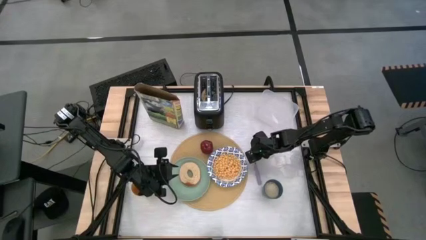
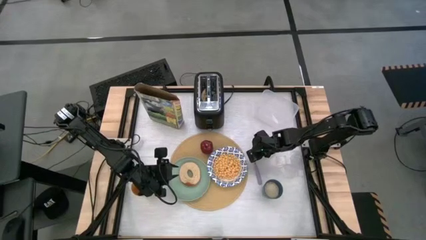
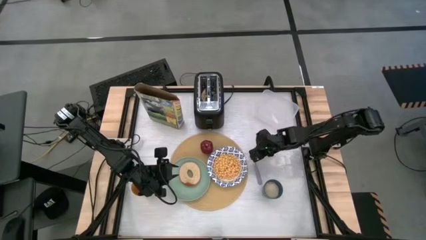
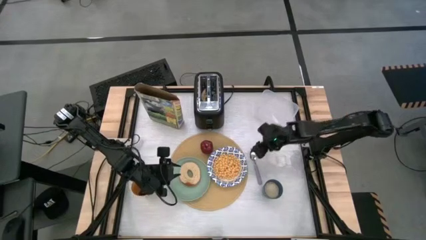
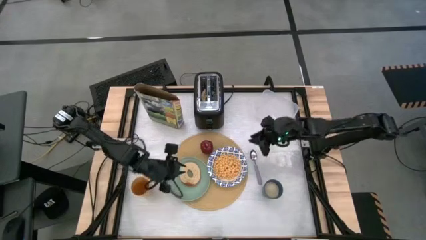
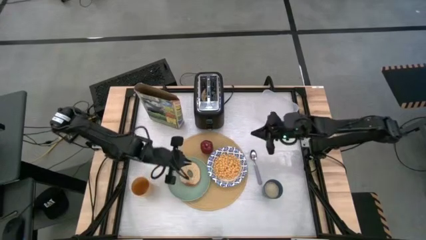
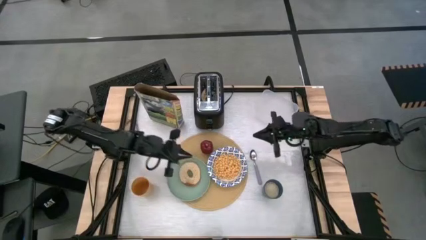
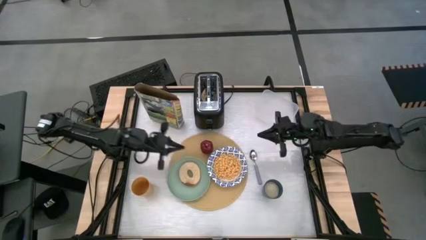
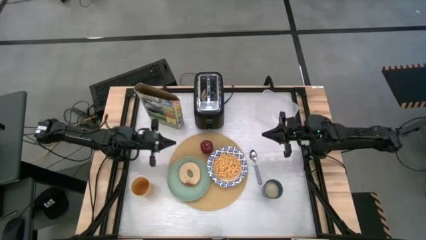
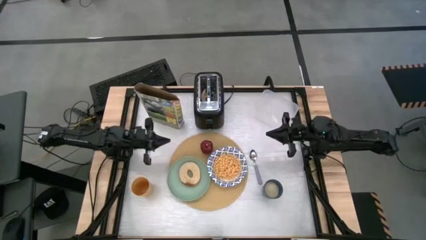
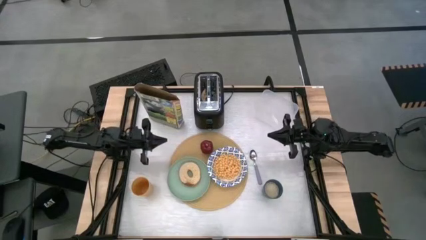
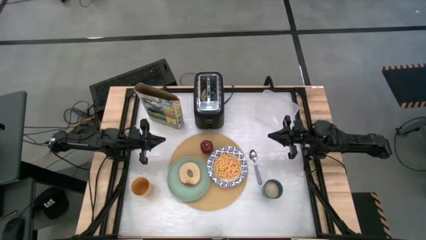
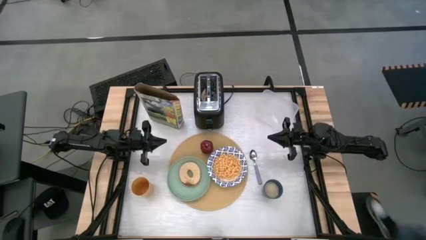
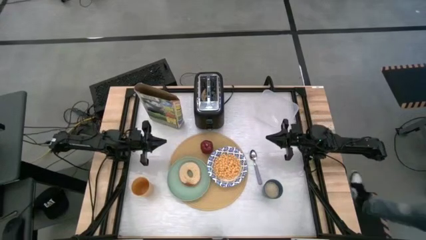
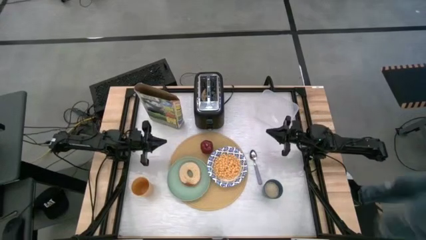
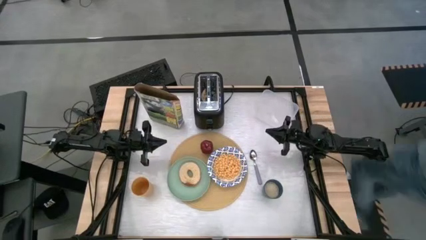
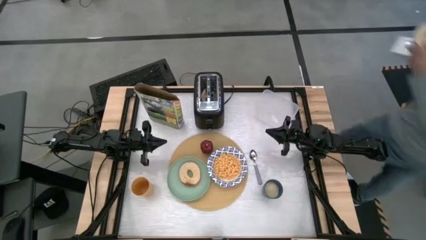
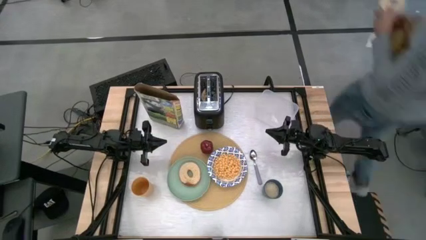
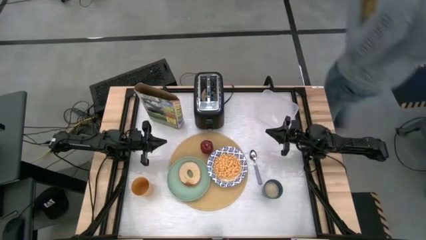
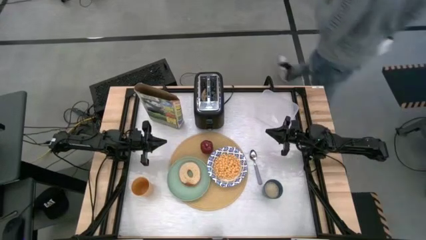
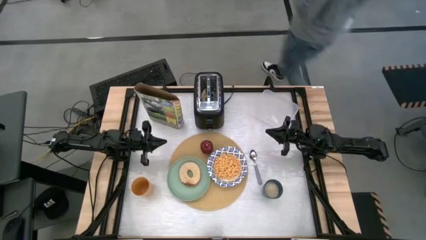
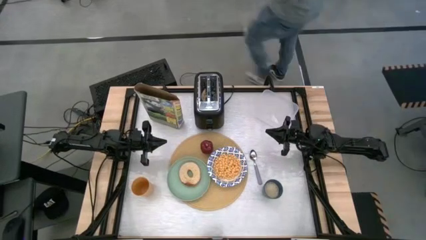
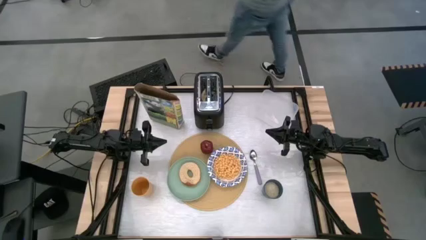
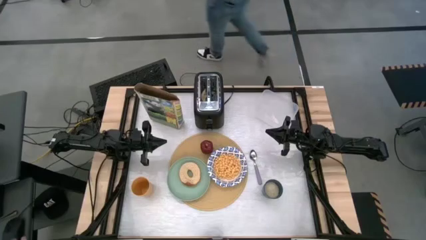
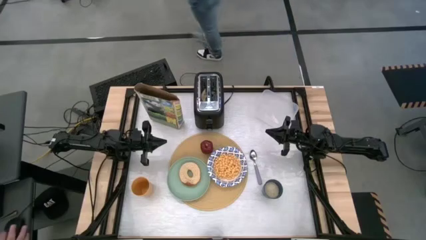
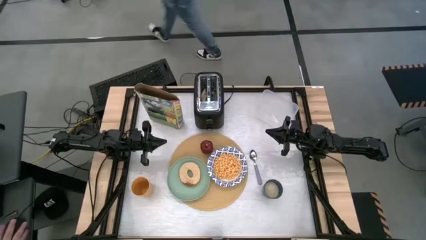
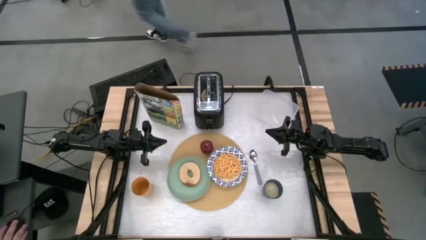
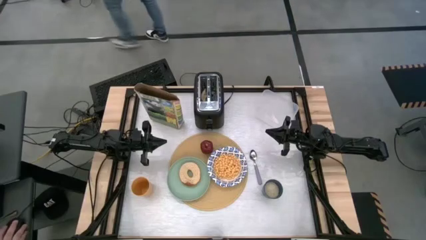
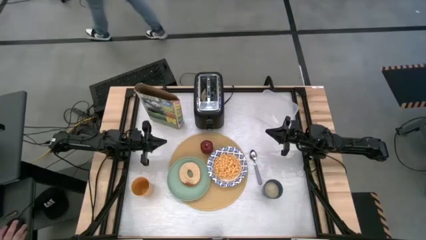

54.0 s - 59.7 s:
Task: Arrange a breakfast setting
Return to Home Position

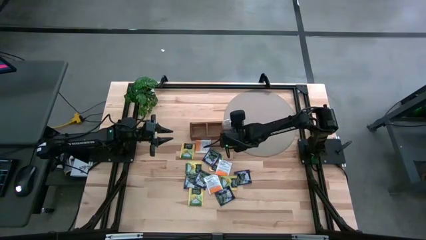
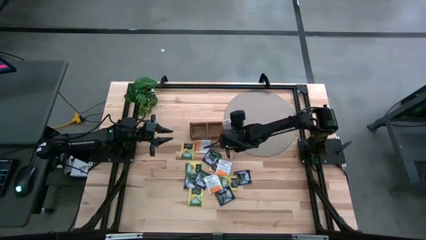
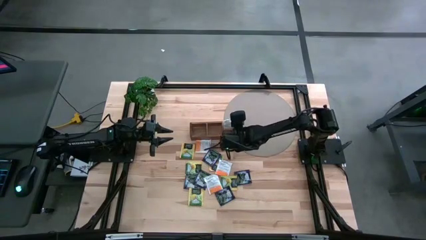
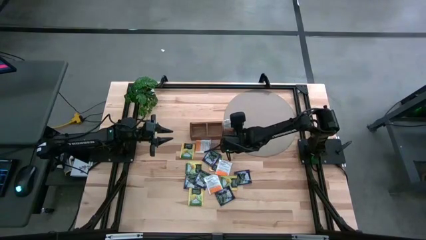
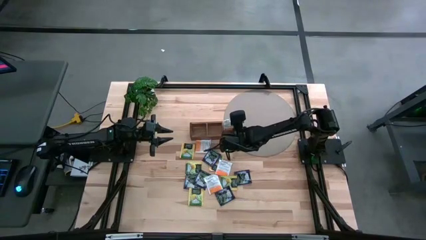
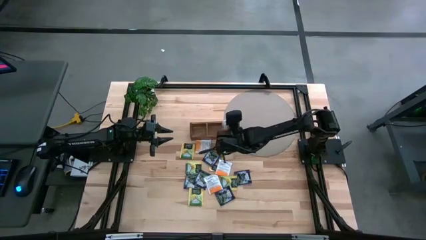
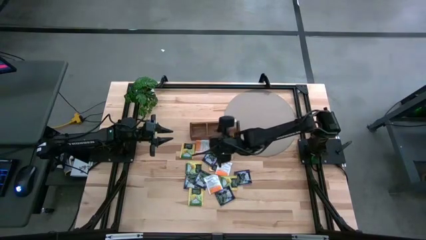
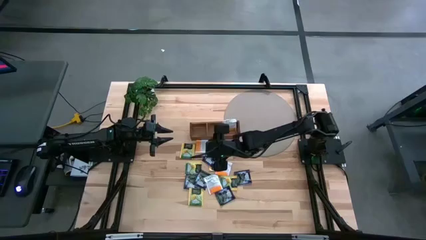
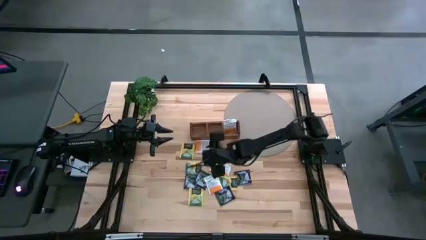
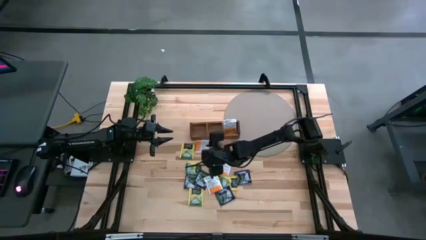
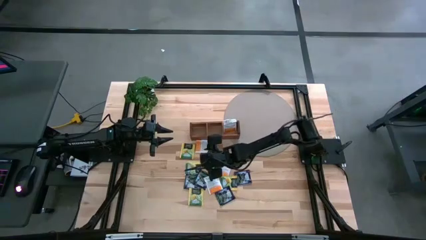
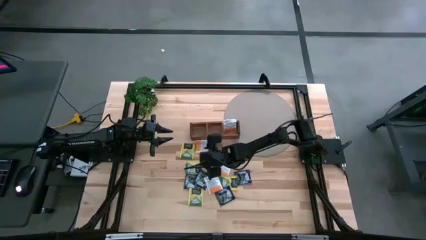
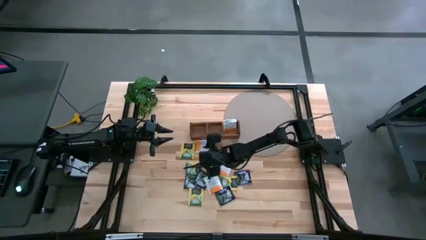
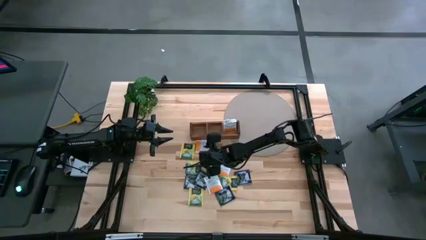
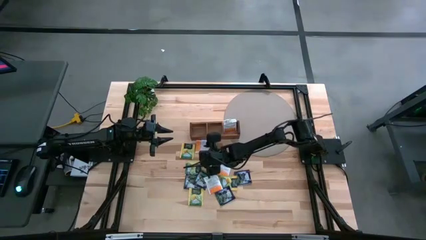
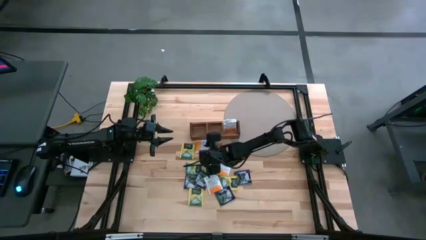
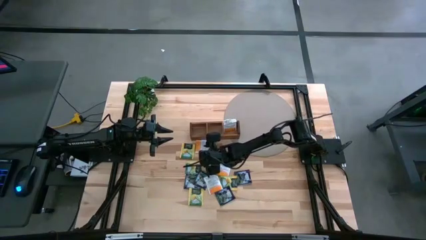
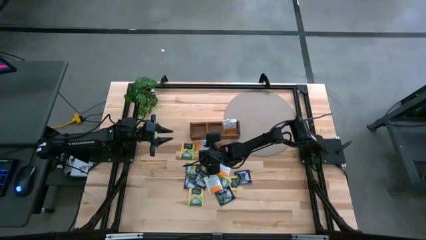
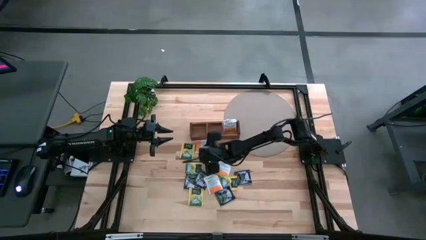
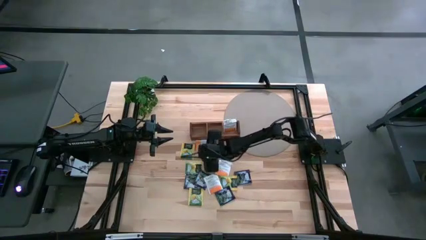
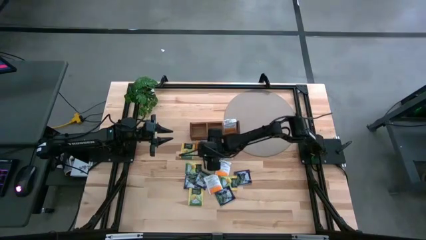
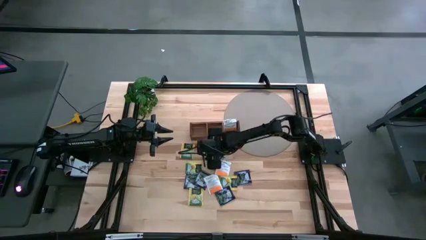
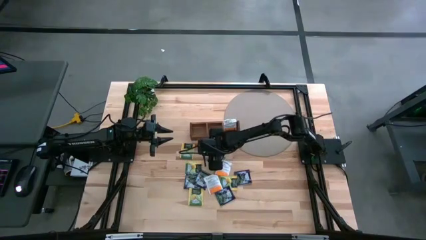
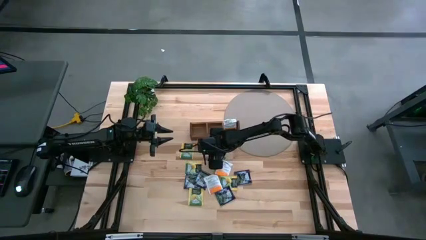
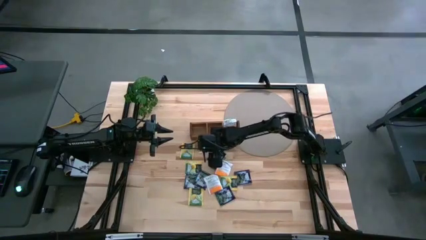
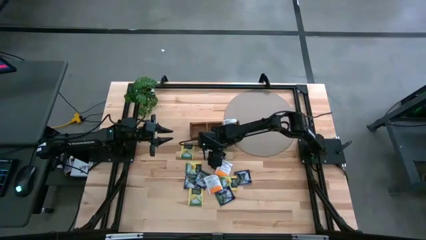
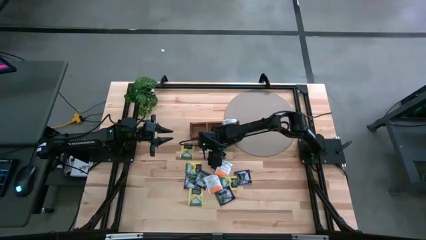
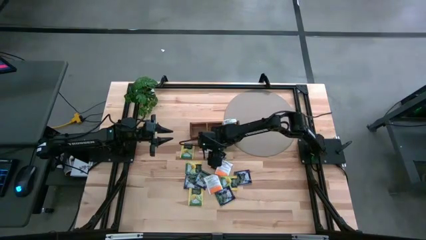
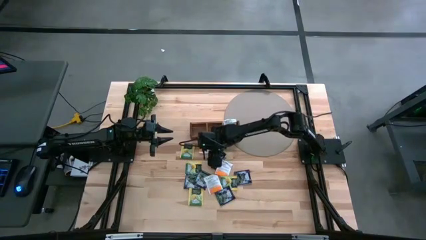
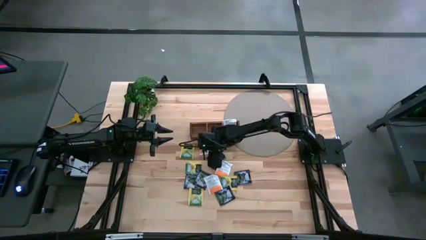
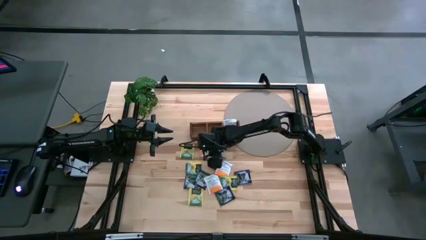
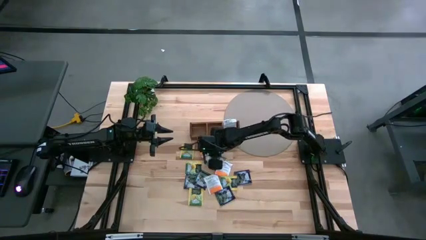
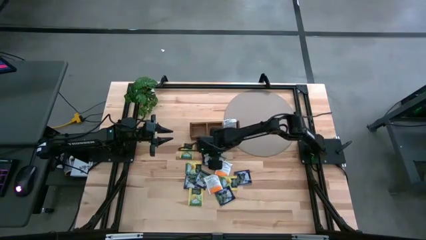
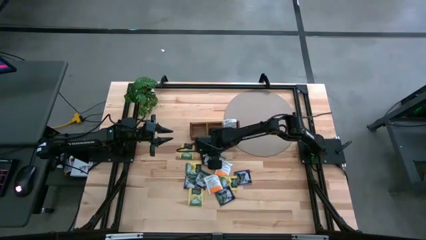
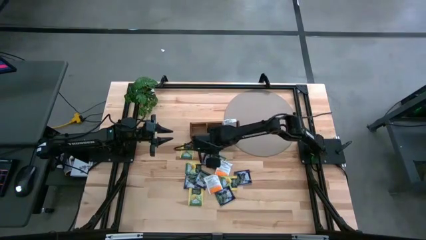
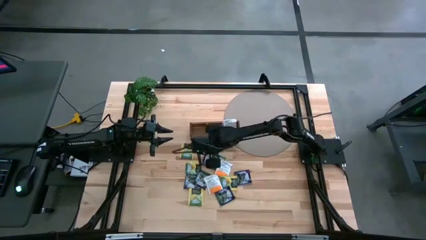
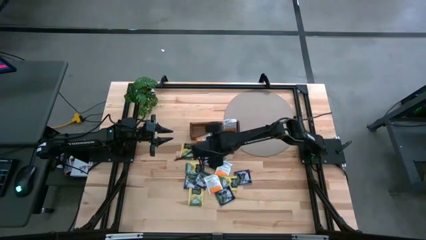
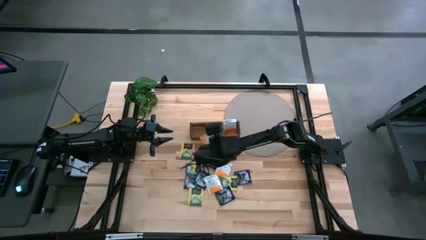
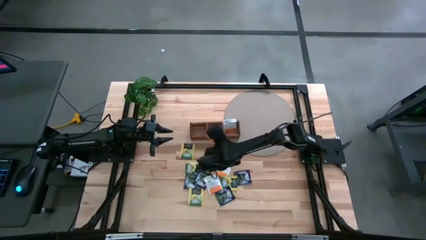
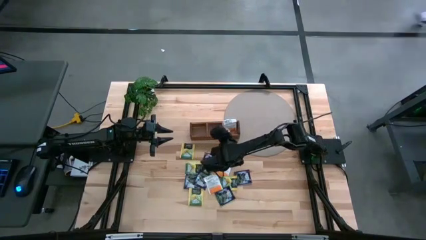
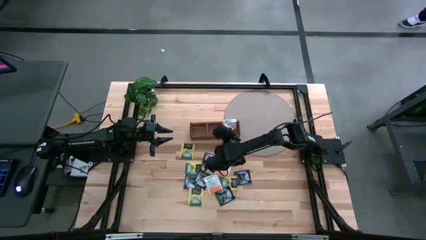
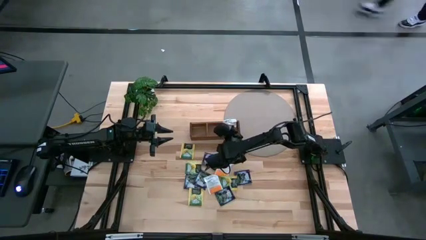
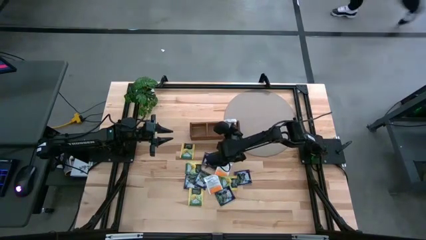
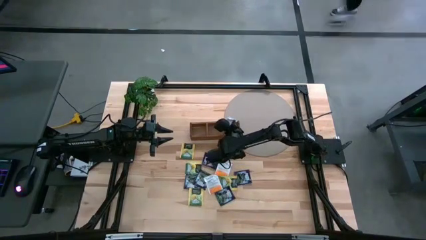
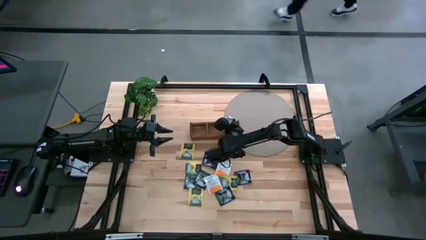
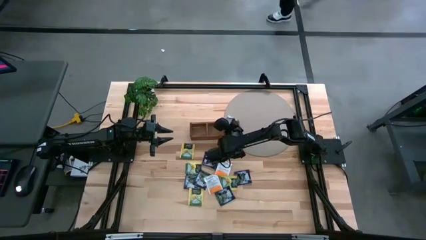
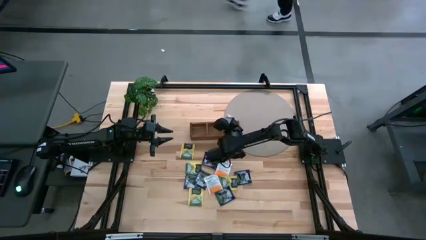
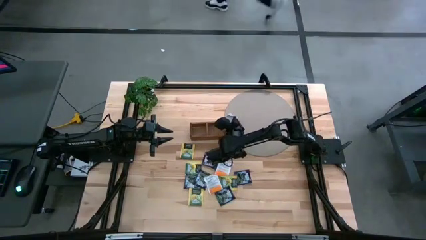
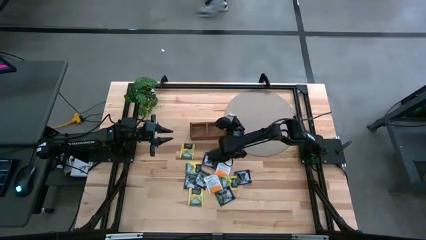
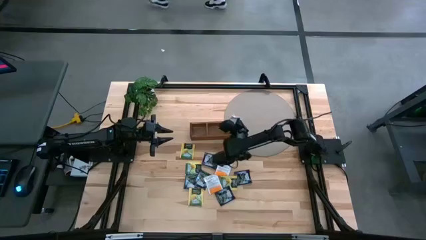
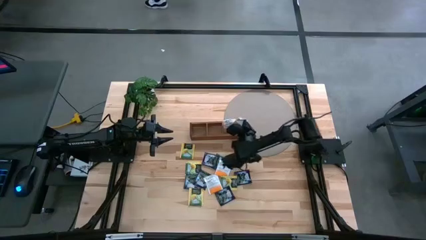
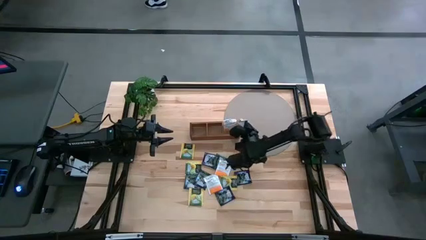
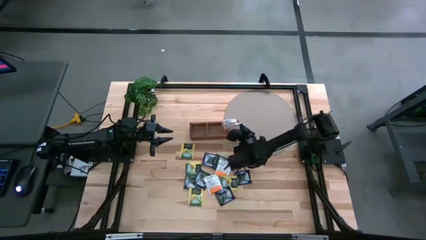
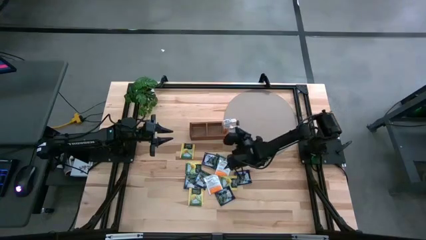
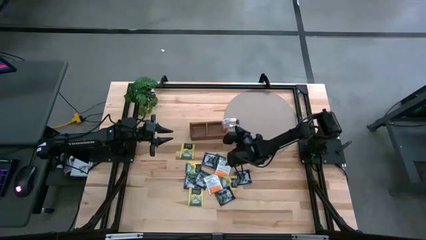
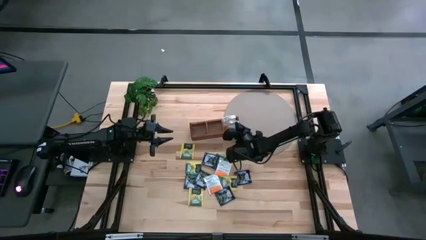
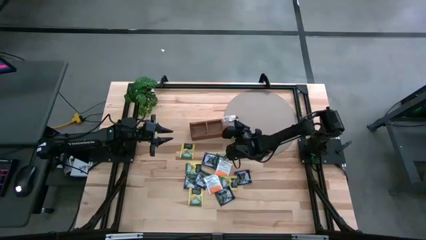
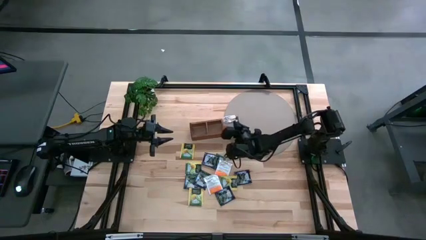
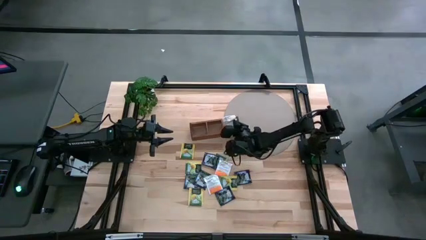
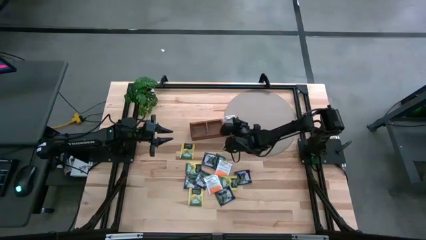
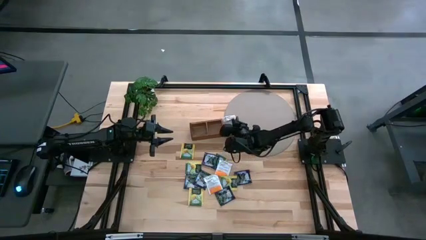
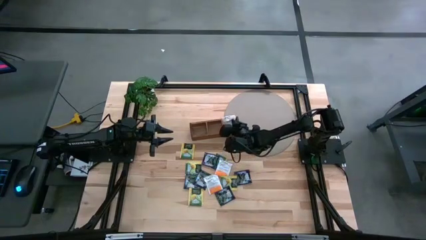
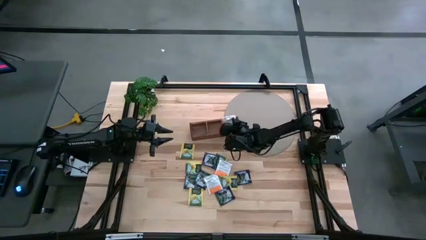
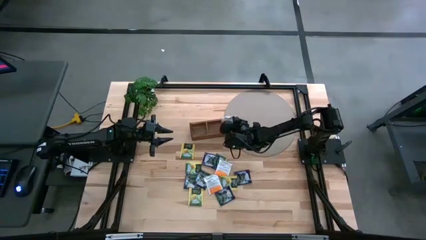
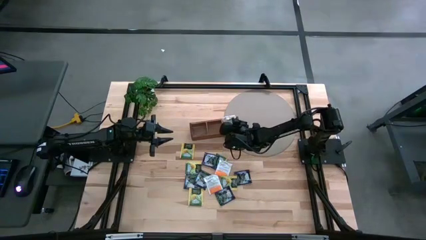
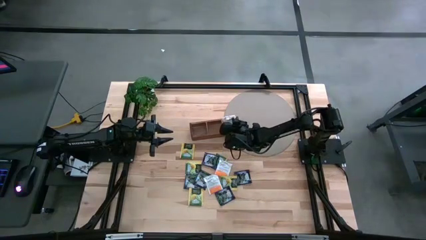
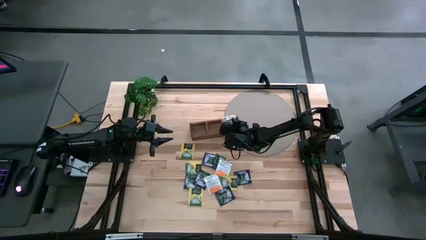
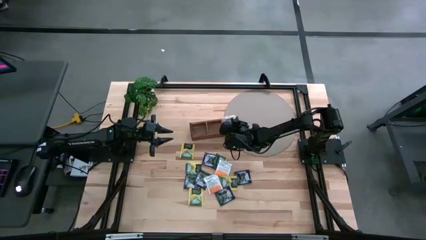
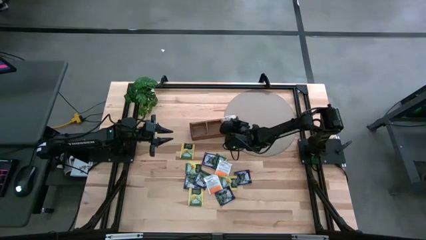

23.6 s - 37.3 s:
Task: Pick & Place Tea
Put the white tea bag into the right section of the wooden organizer
